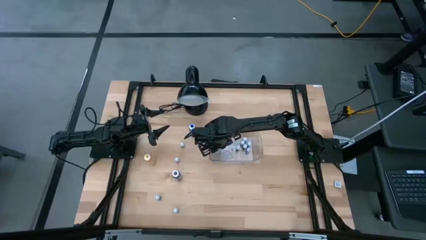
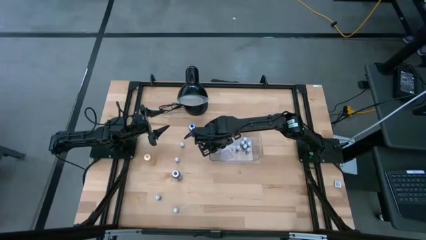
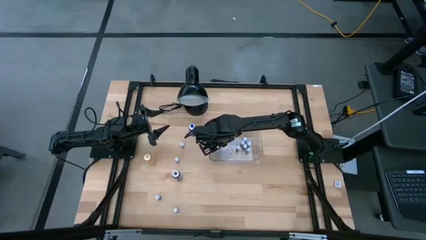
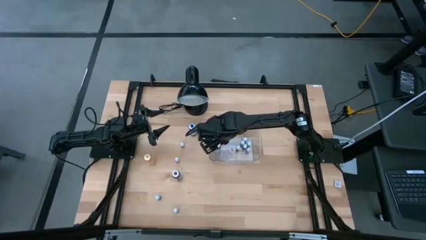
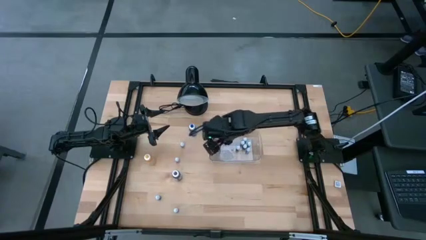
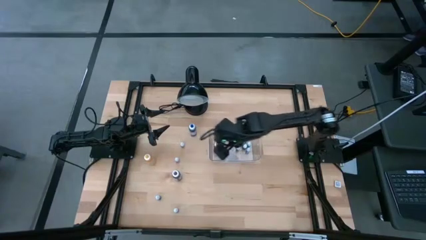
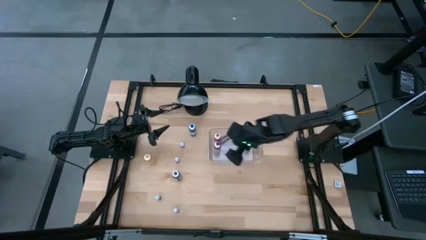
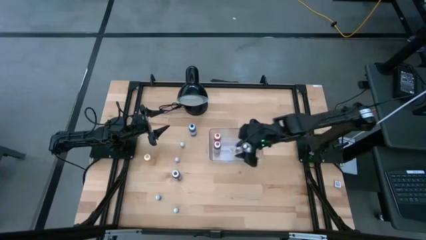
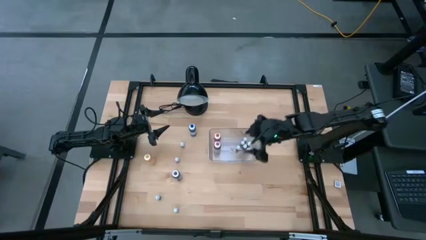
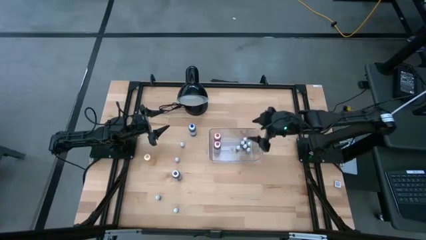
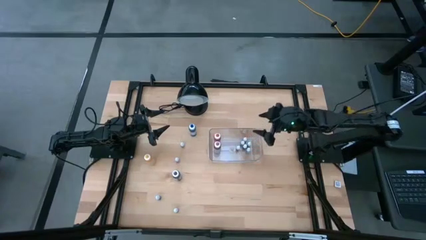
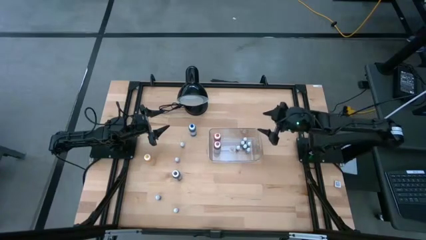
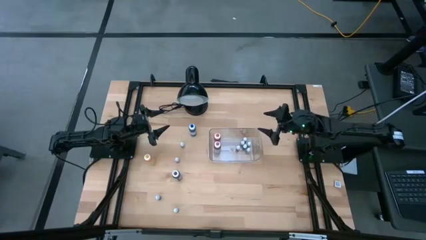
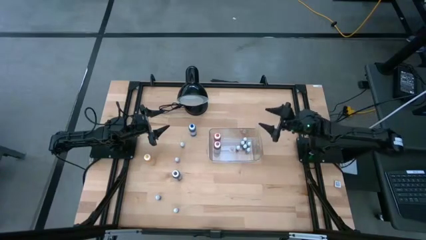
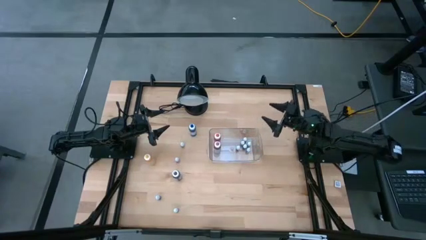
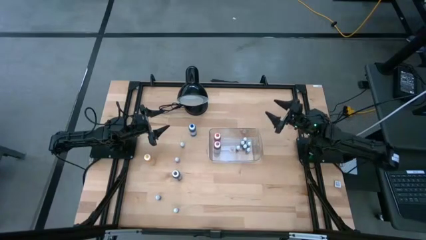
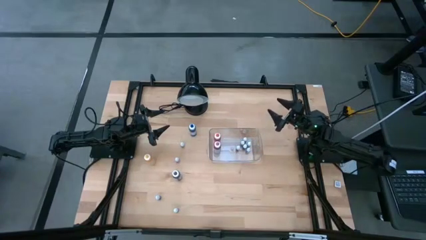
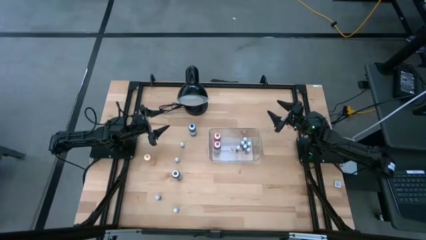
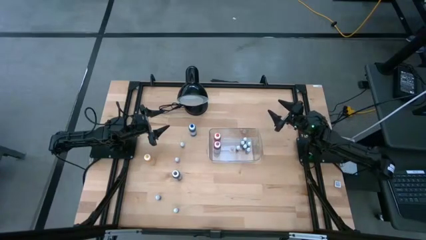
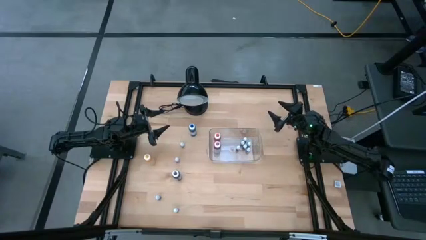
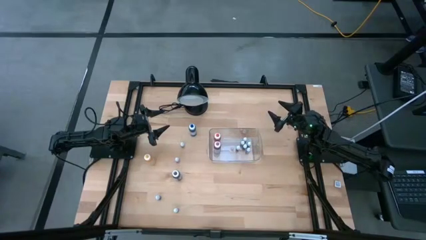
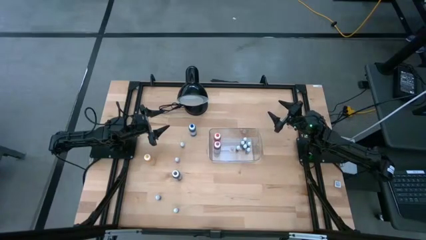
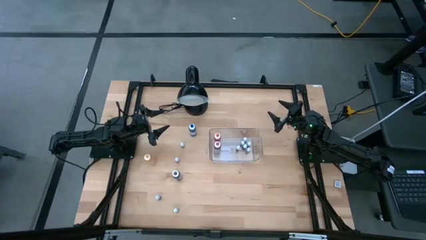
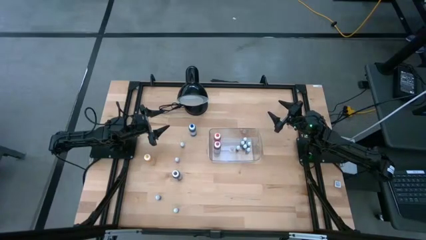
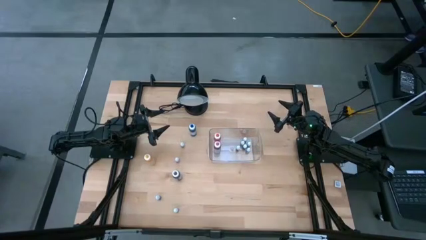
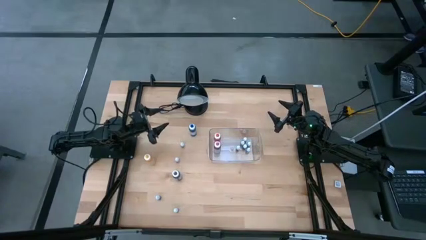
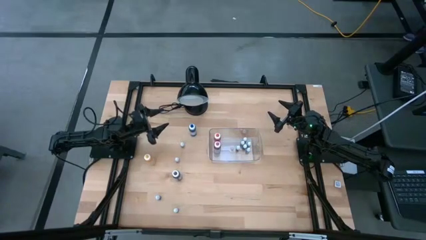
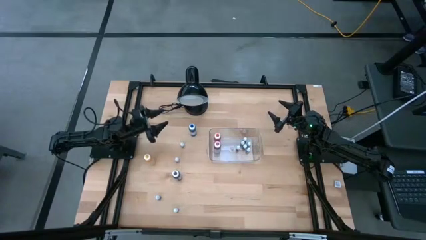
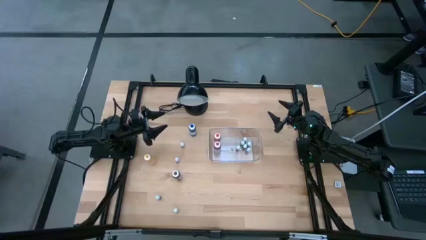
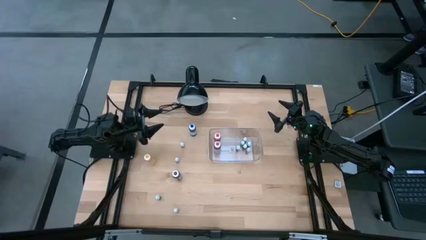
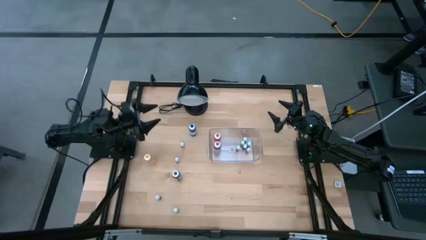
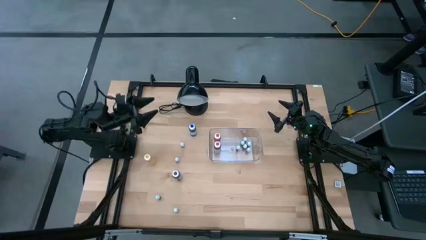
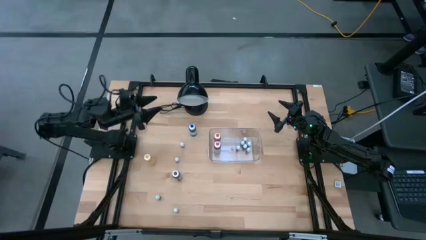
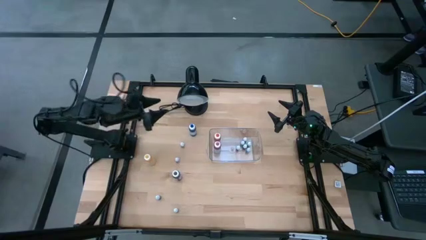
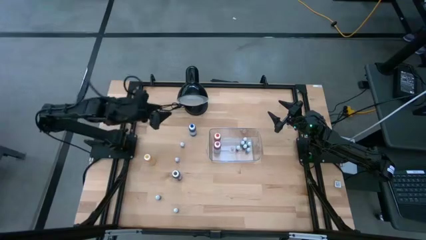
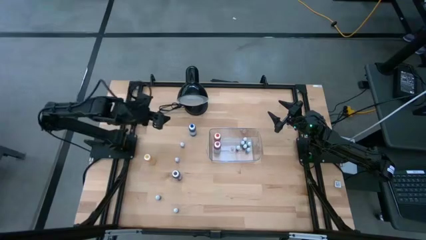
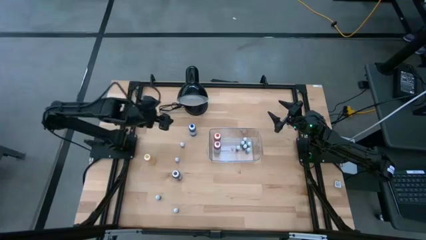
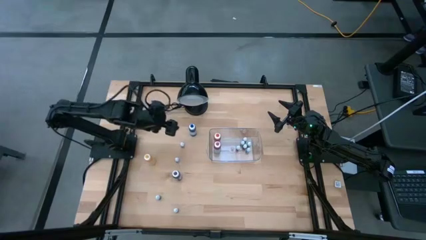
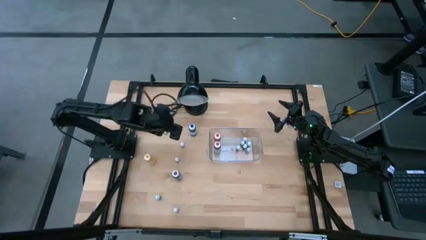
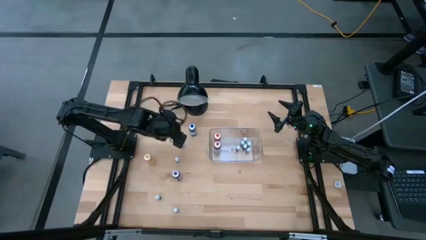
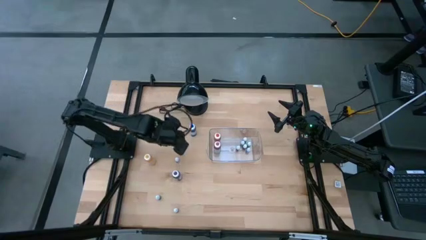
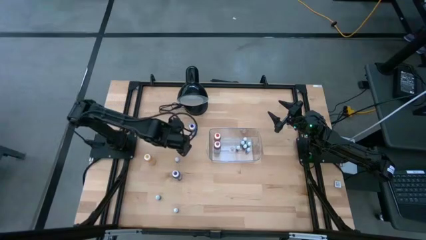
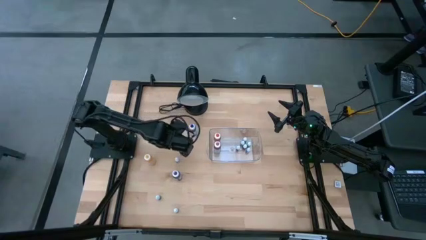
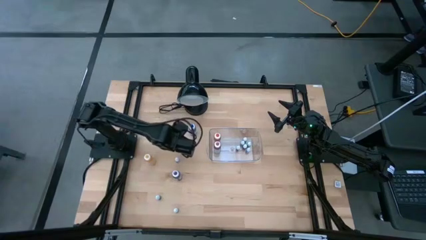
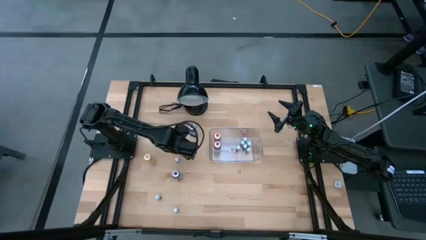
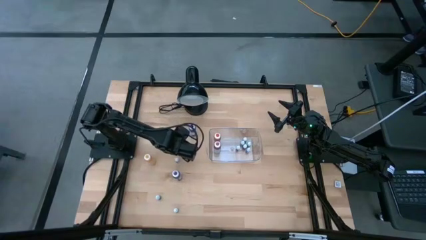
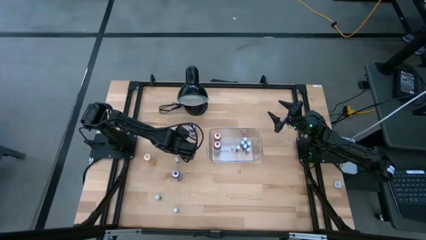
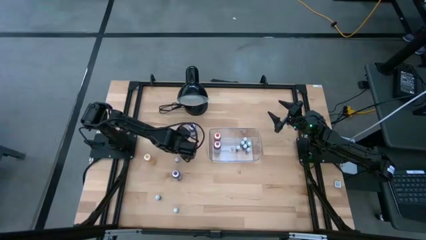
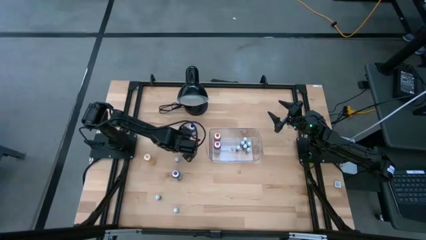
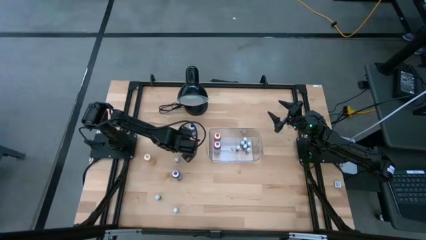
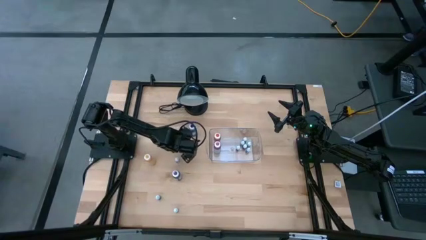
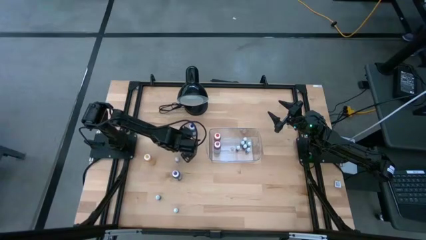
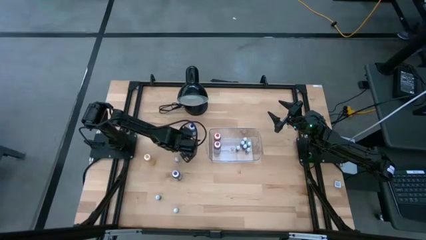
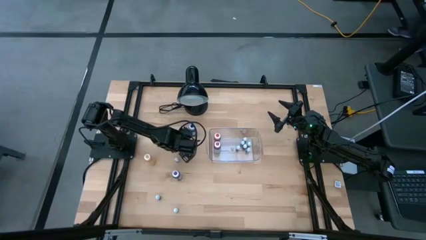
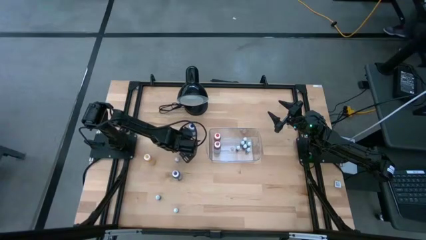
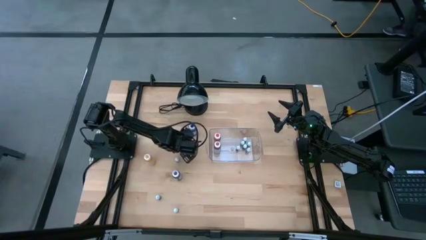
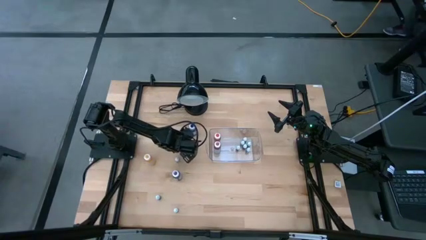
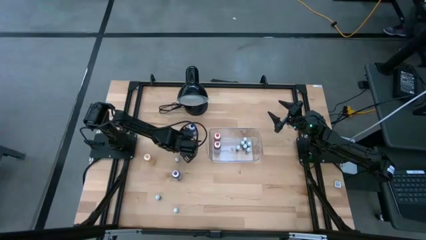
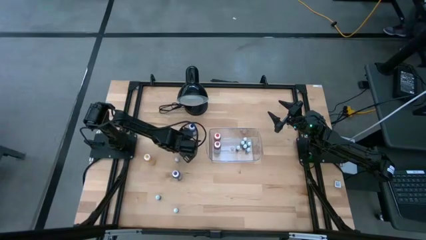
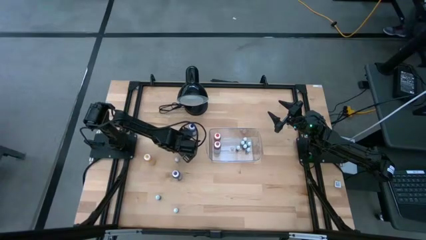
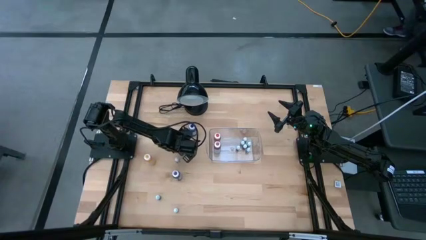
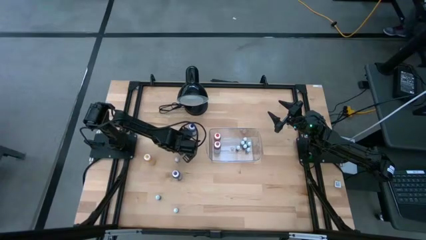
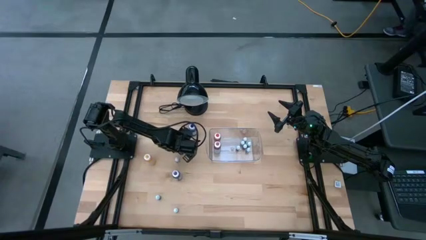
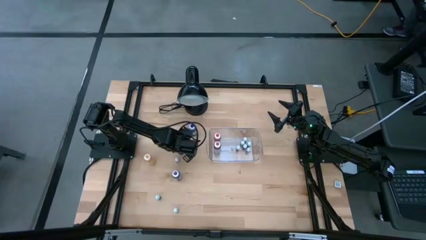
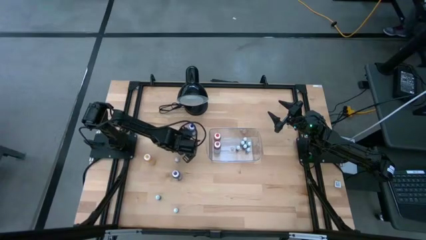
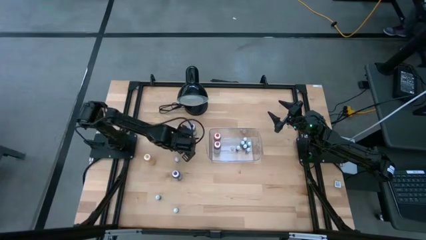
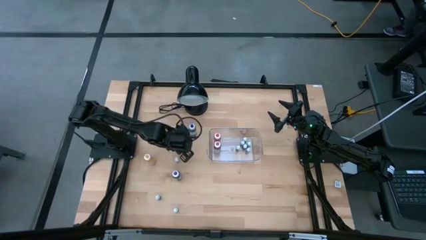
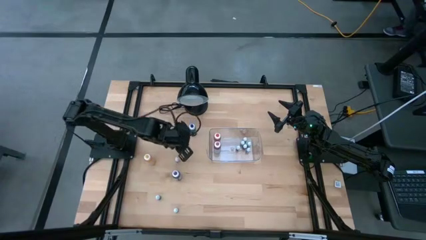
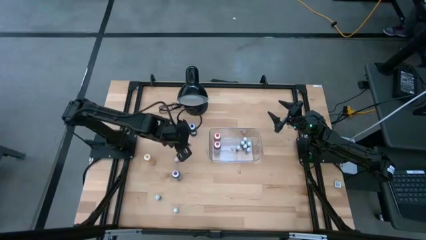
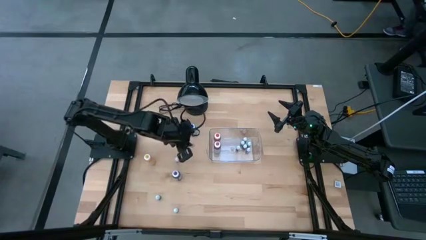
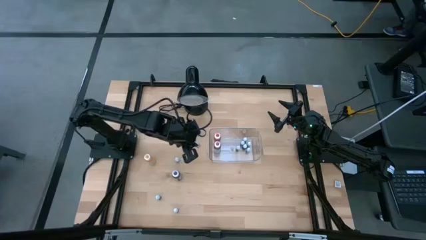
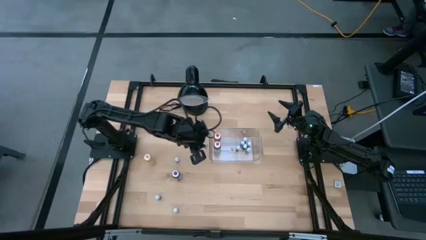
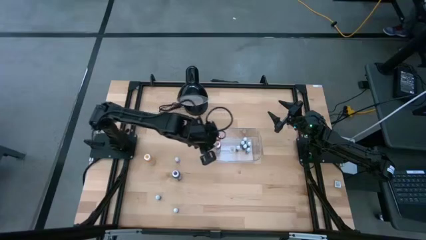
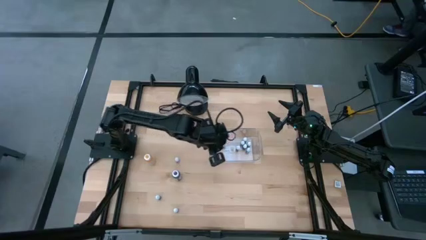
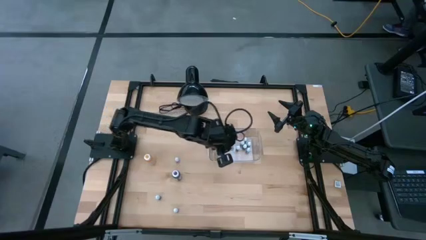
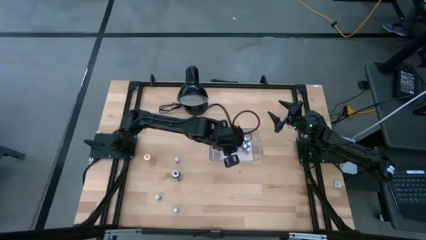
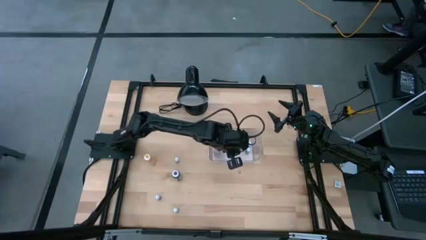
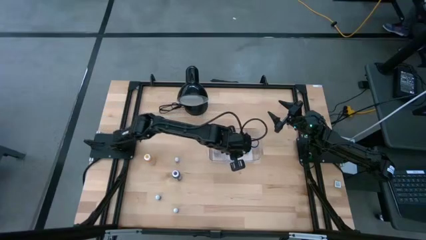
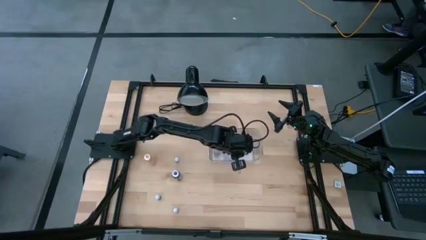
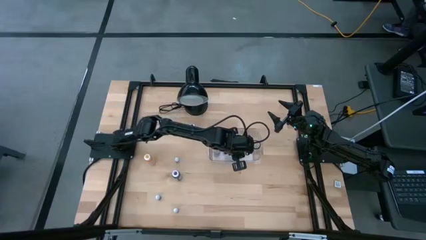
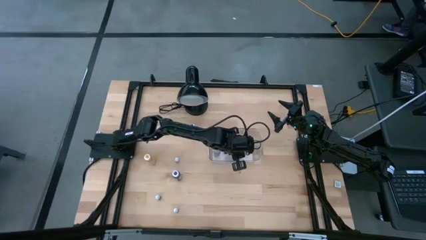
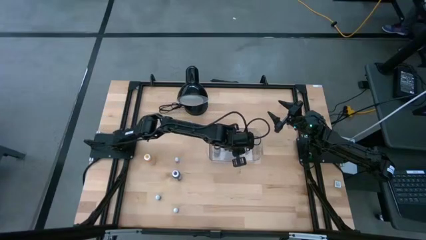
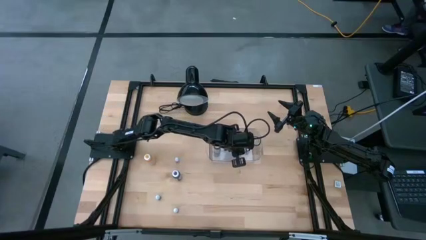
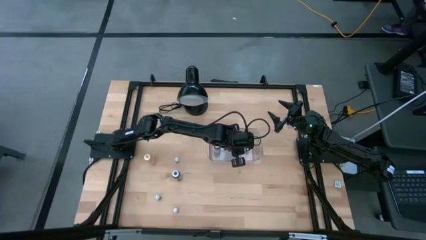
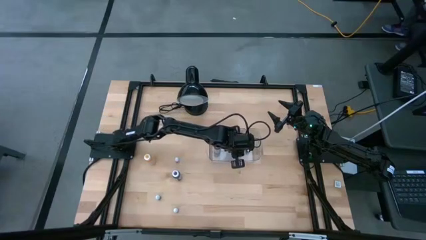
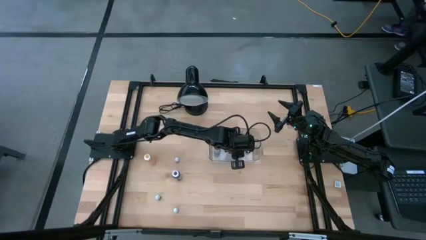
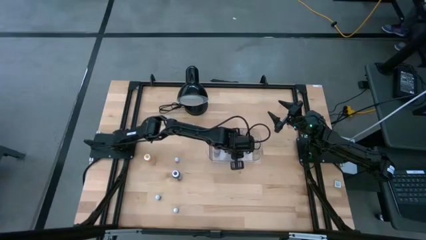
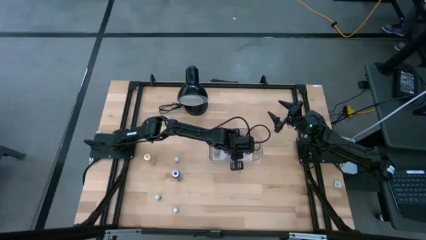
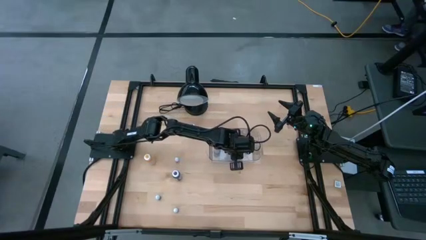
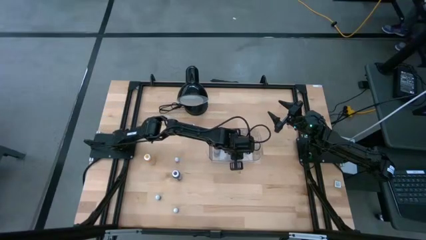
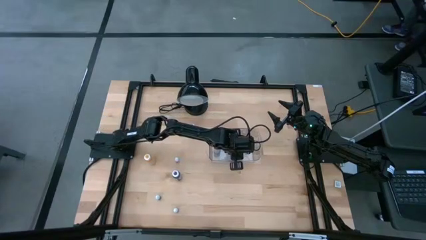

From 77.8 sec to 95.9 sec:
Task: Pick & Place food coloring
Put the small green food coloring bottle into the transparent bin
